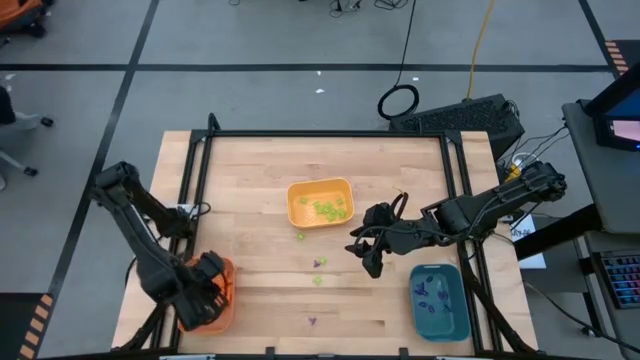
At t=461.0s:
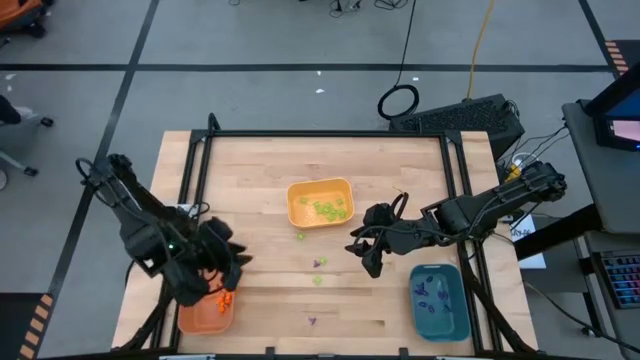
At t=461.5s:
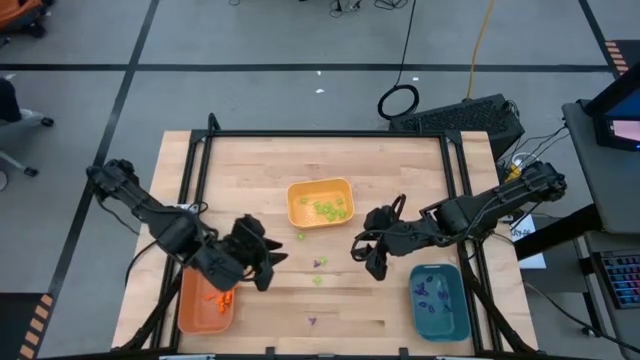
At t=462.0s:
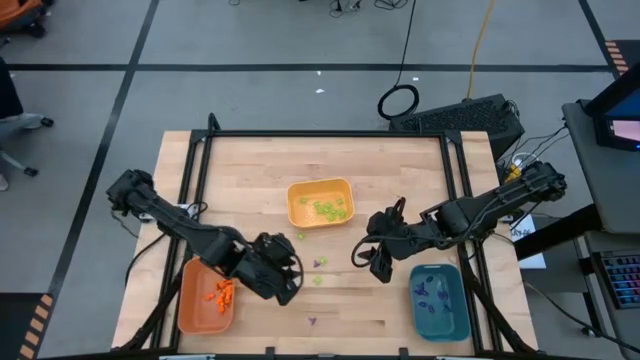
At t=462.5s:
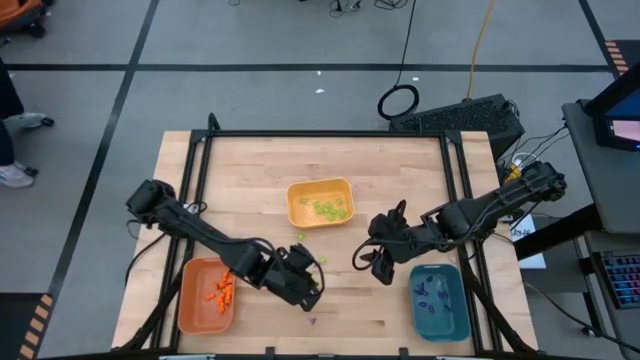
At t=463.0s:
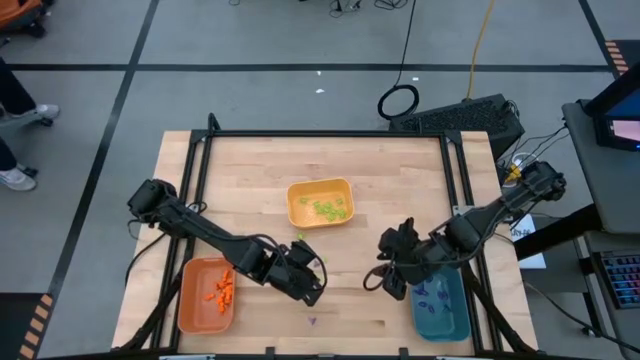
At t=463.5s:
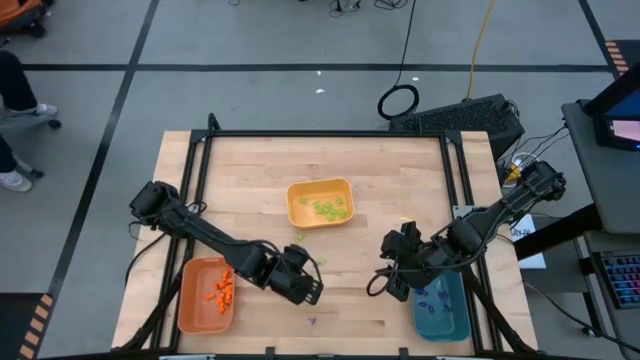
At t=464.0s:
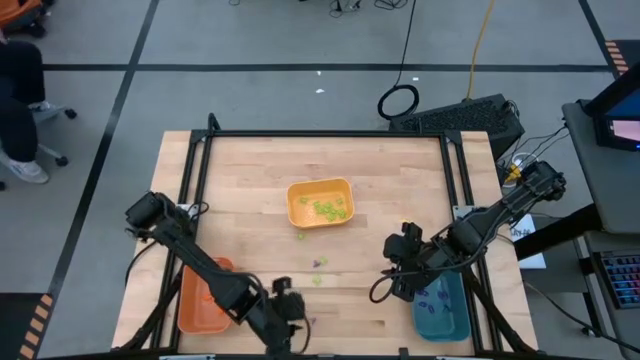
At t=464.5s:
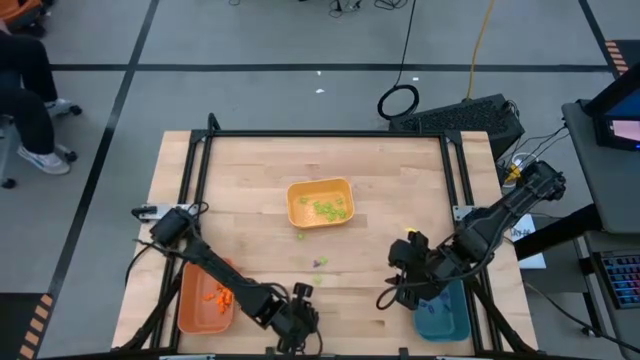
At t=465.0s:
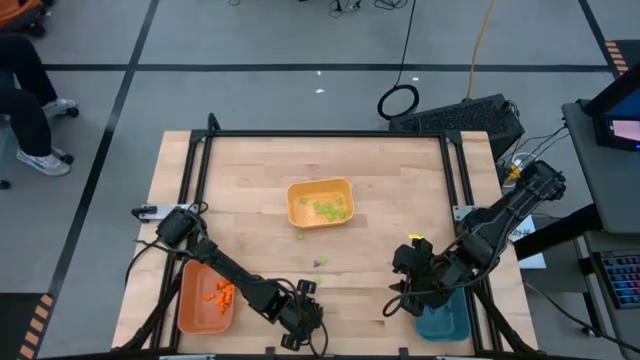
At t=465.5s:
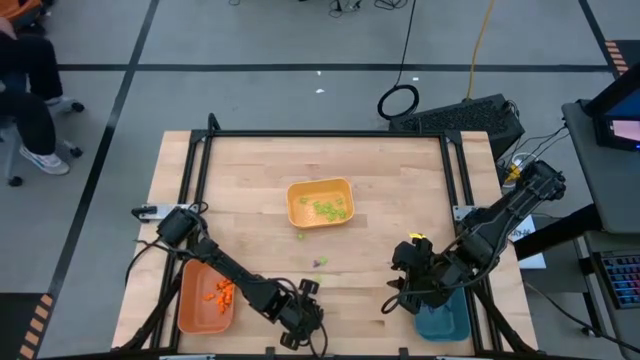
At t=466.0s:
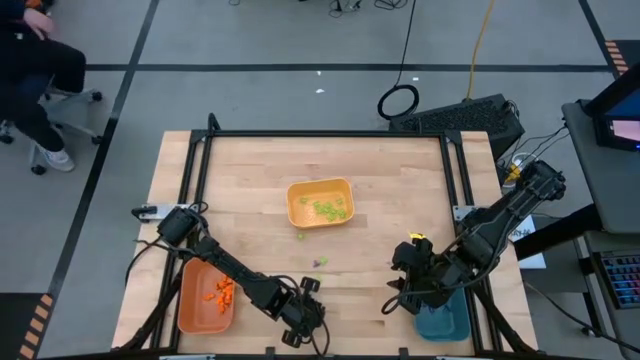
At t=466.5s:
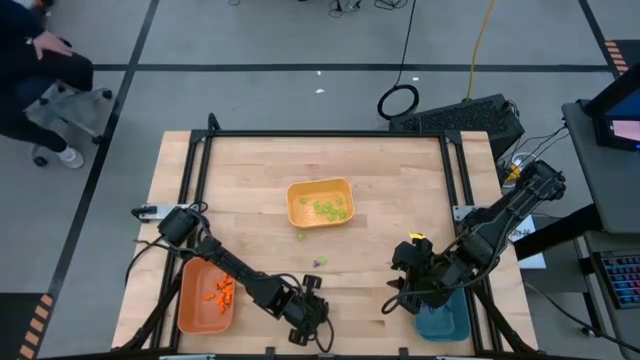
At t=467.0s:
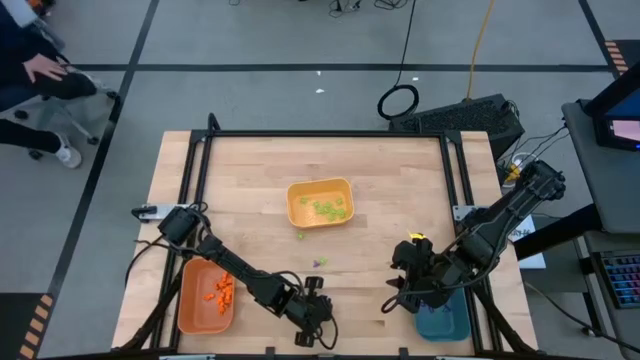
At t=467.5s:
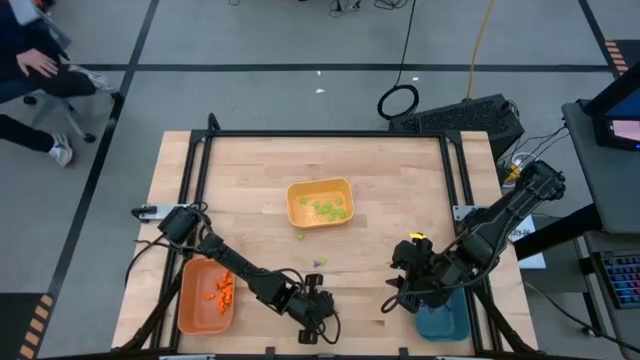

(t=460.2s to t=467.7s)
Task: Sort Halloween decoration
Put the violet witch hat toy into the blue bin

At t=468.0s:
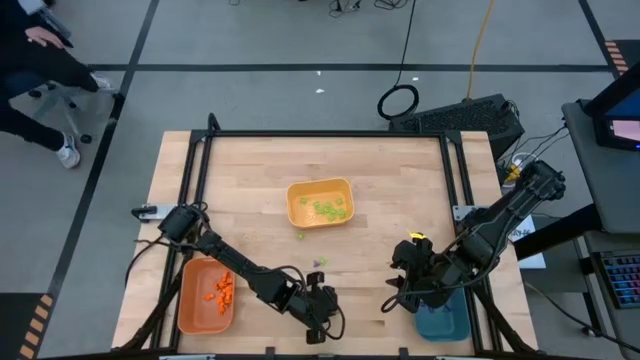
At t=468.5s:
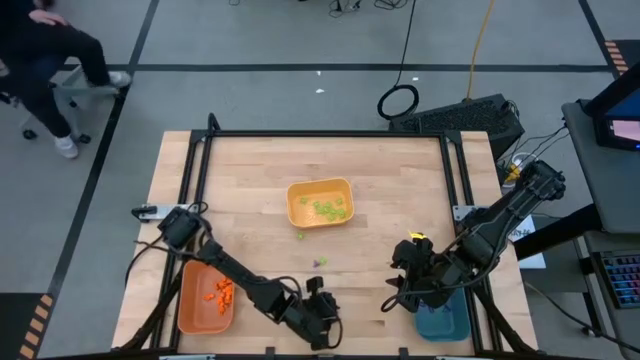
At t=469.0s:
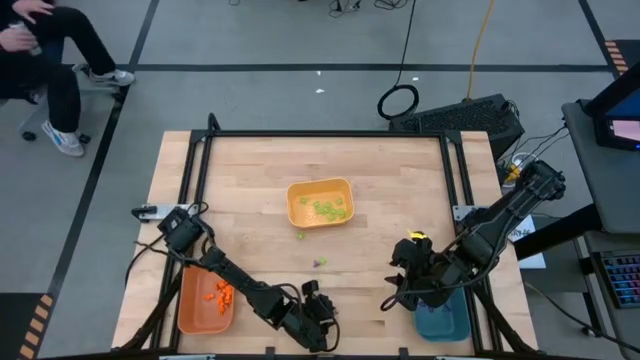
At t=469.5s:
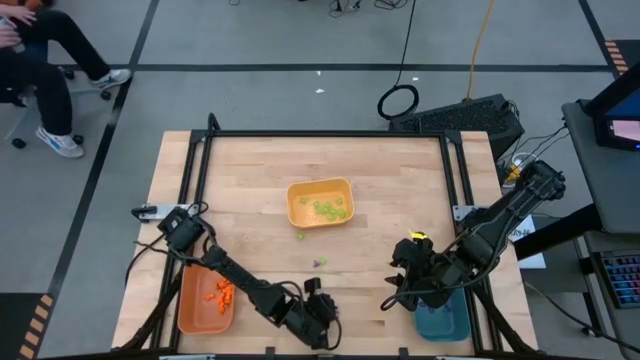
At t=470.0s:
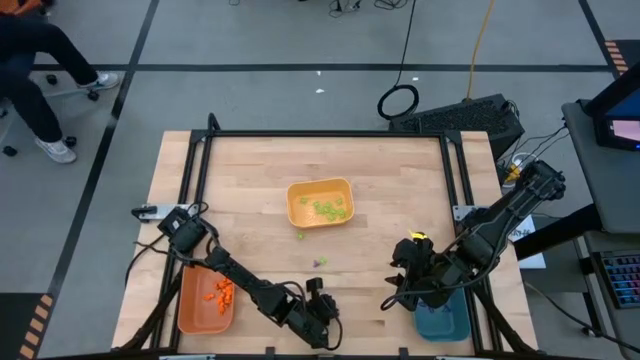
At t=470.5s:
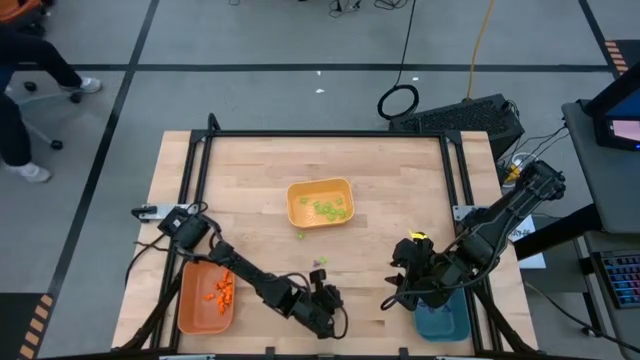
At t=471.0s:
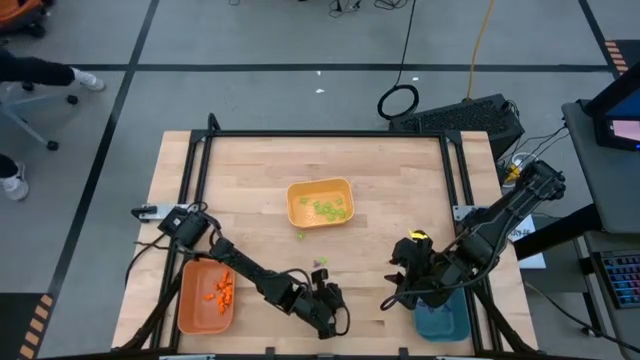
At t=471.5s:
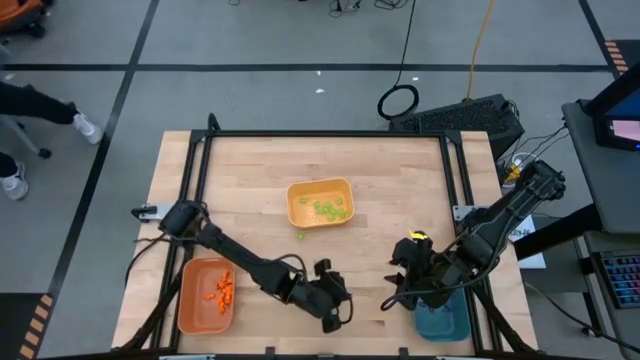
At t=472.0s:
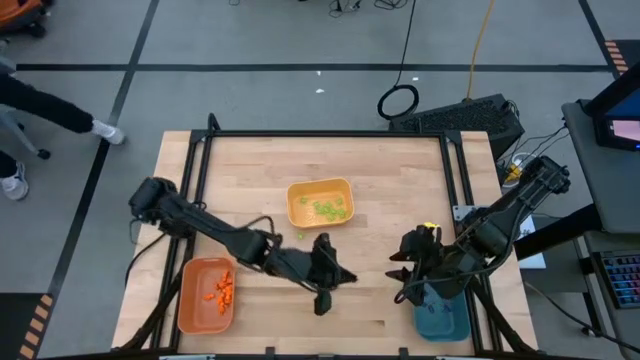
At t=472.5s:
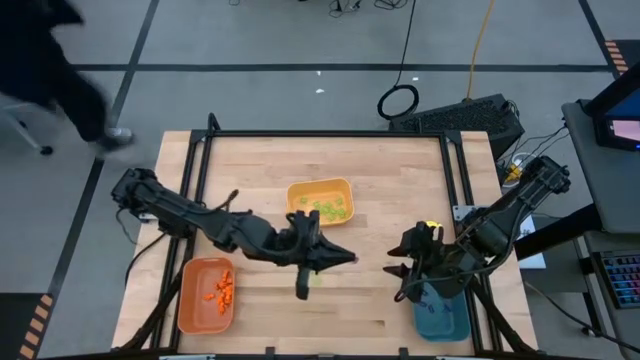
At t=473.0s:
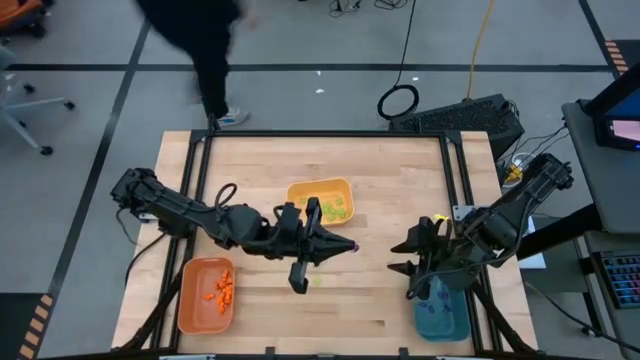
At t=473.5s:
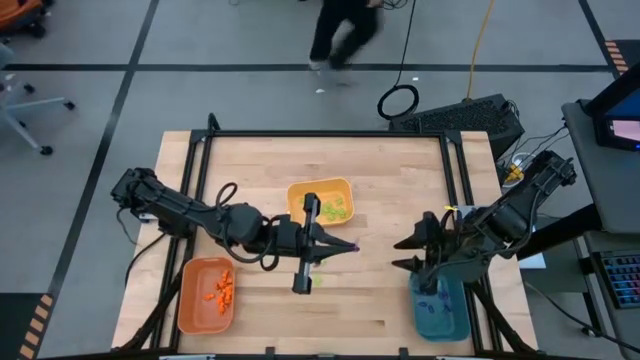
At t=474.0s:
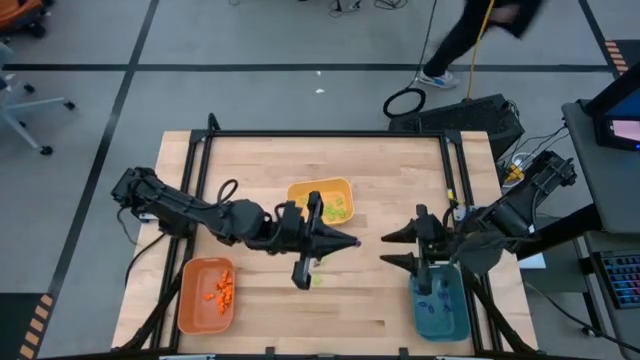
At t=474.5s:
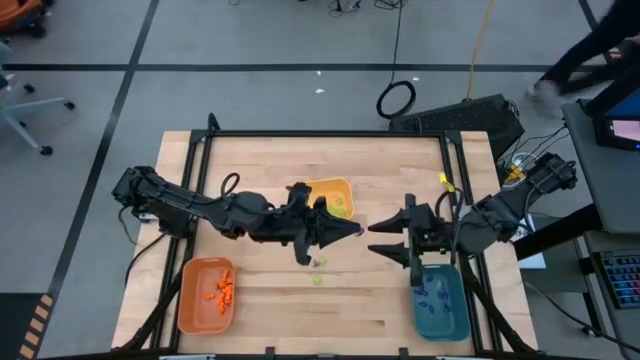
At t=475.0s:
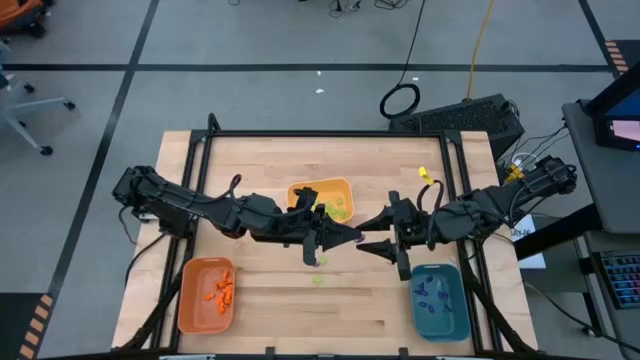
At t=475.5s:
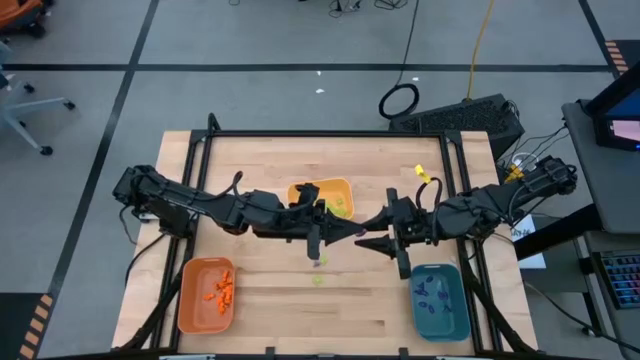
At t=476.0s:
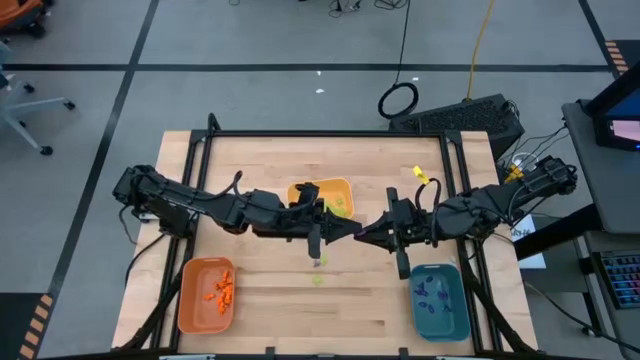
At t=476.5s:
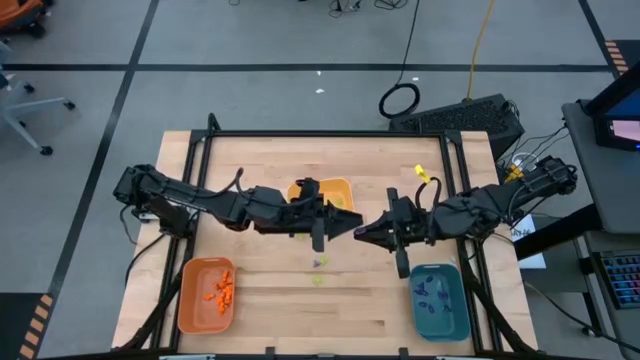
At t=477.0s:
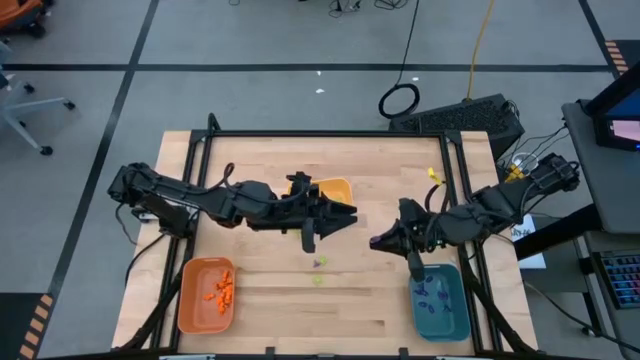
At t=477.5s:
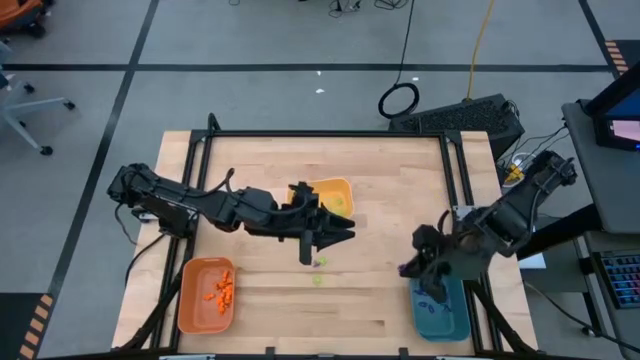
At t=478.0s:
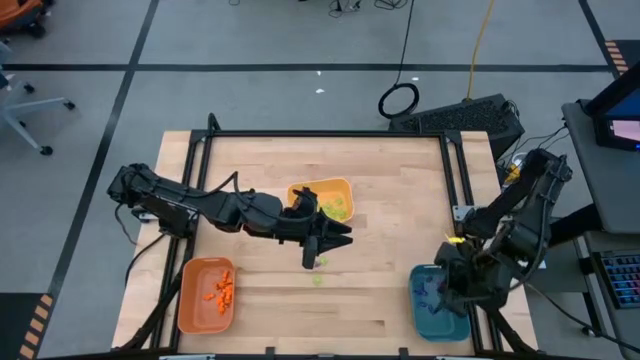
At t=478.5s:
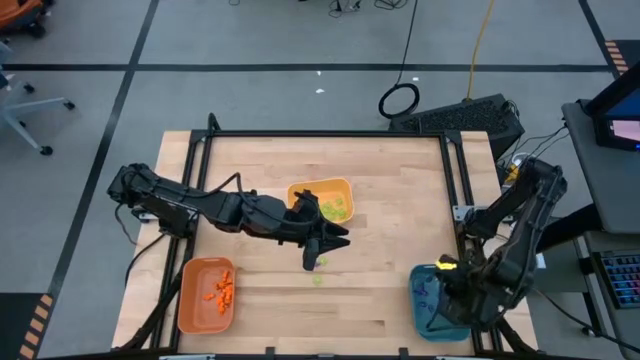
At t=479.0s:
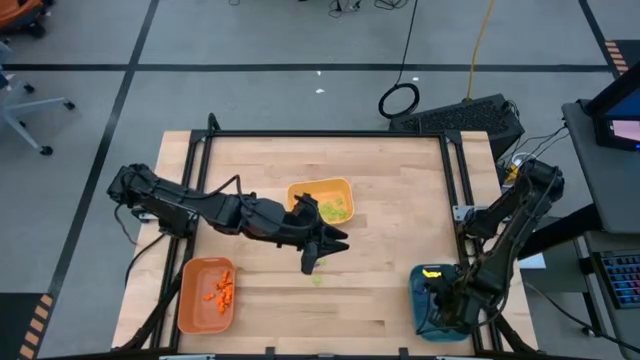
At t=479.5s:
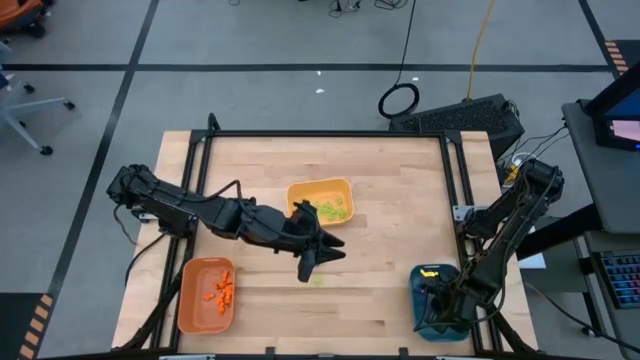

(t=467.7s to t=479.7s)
Put the violet witch hat toy into the blue bin

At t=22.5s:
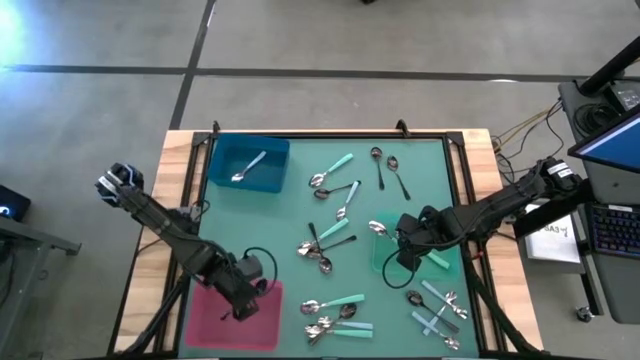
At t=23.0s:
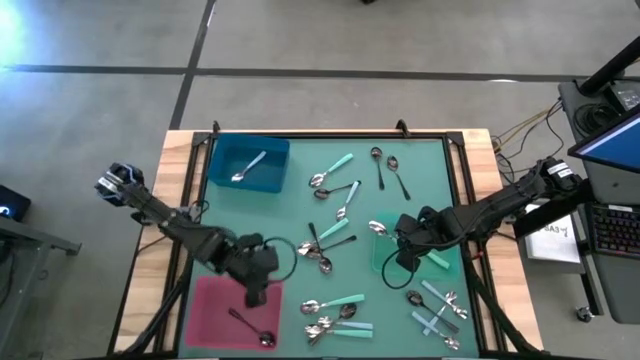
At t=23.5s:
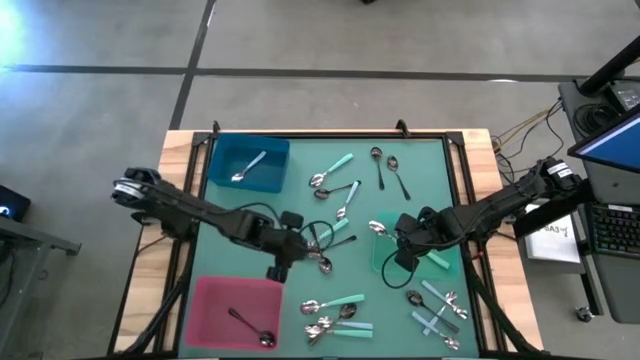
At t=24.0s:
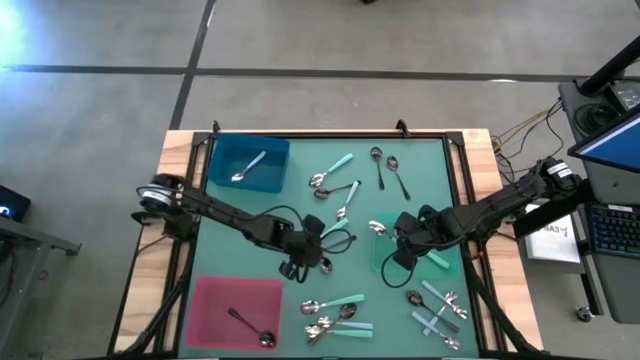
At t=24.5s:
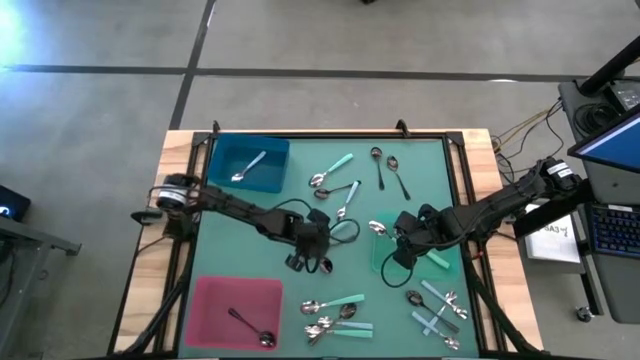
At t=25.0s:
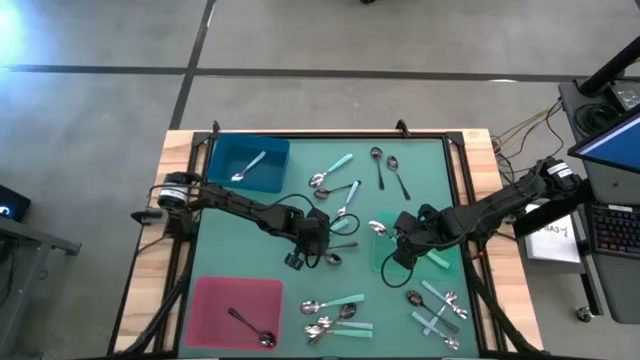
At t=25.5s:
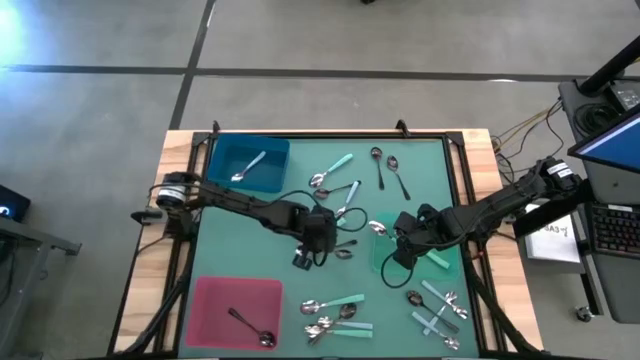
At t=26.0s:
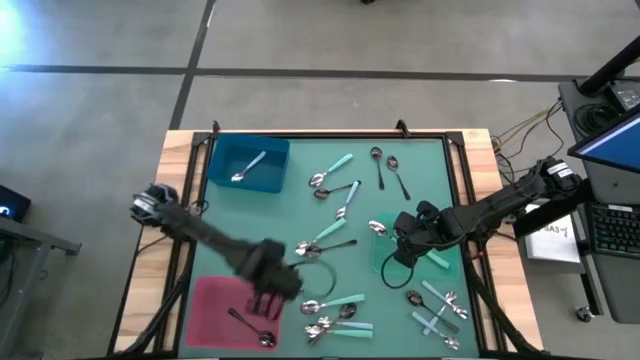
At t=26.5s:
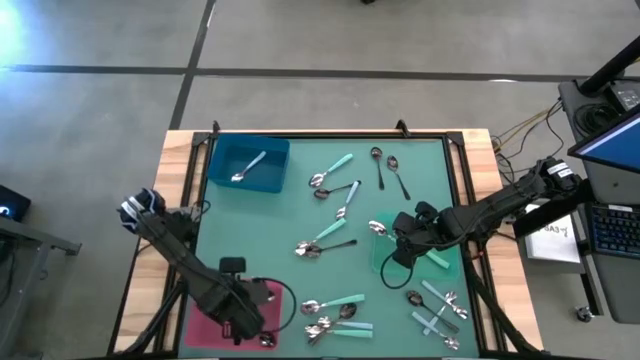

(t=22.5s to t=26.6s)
Task: Sort silverware by color (type)
Put the black spoon into the pink bin
